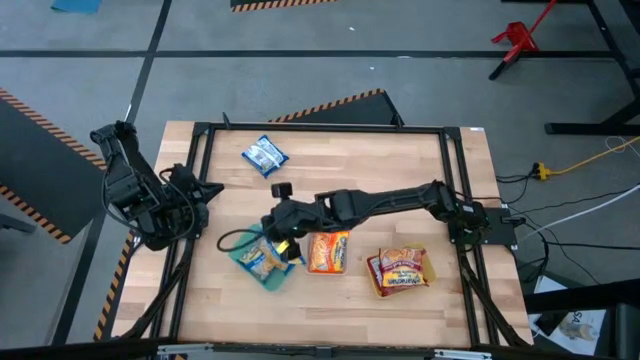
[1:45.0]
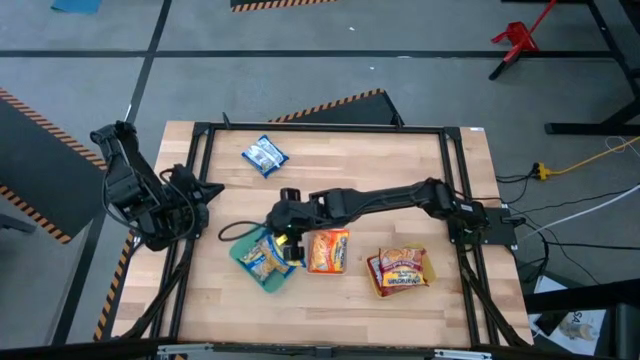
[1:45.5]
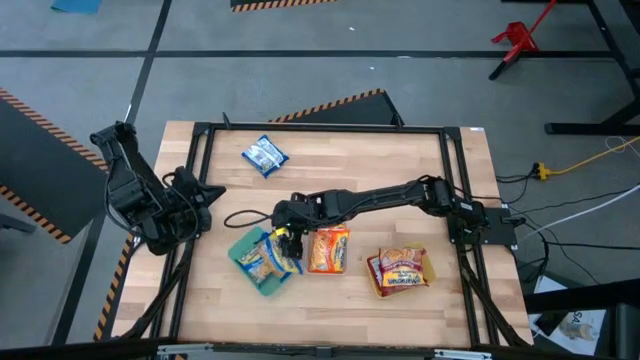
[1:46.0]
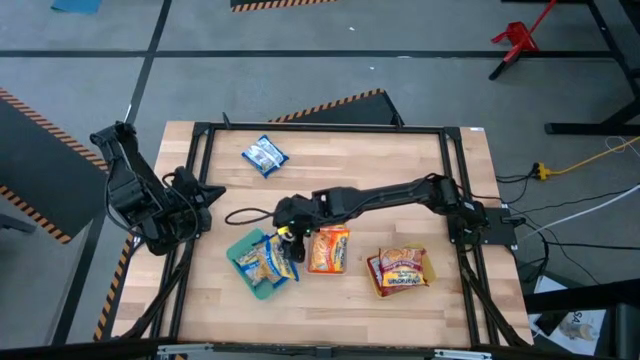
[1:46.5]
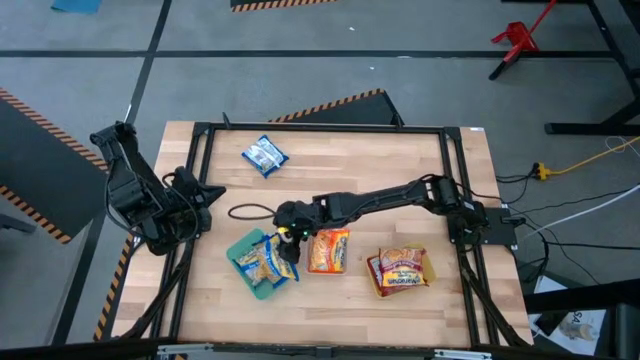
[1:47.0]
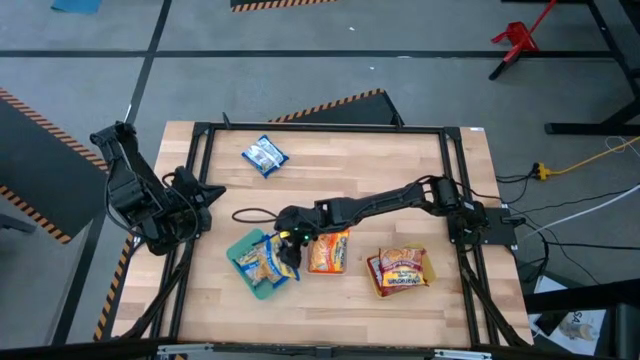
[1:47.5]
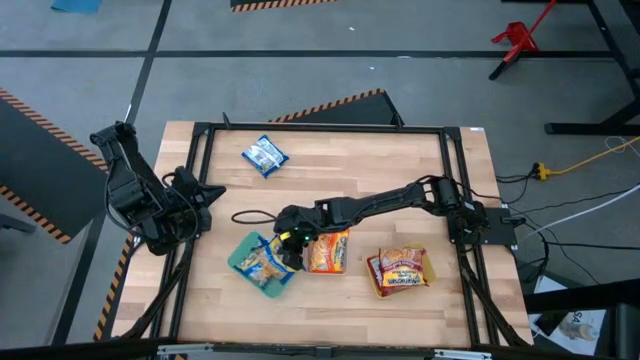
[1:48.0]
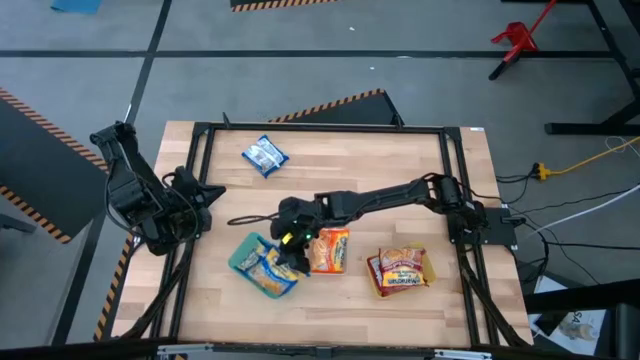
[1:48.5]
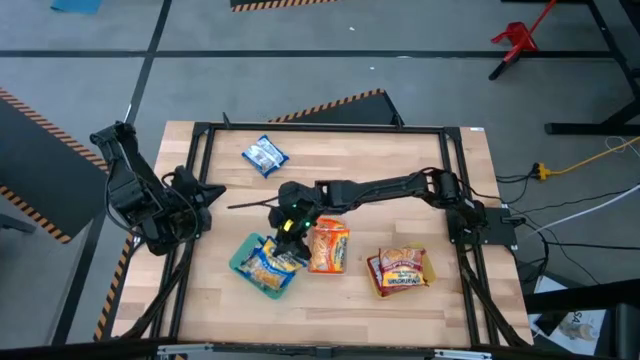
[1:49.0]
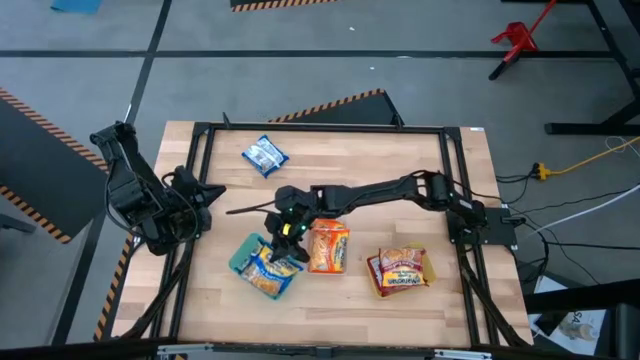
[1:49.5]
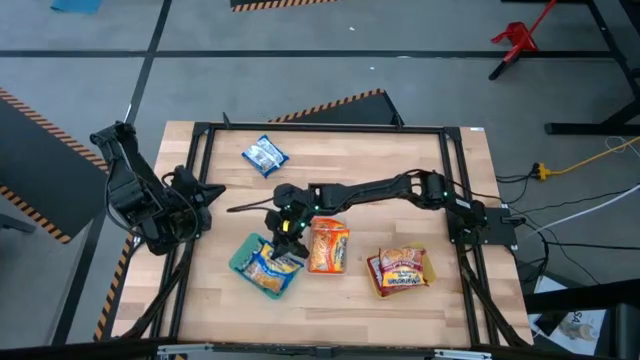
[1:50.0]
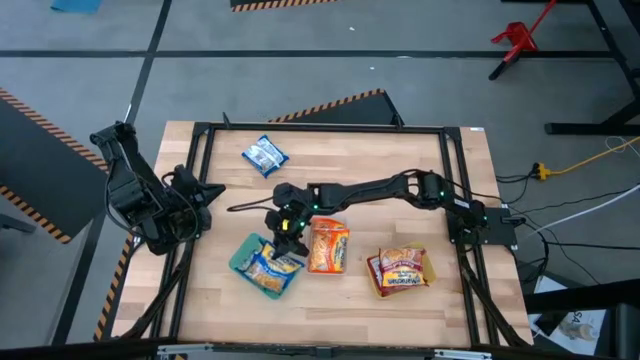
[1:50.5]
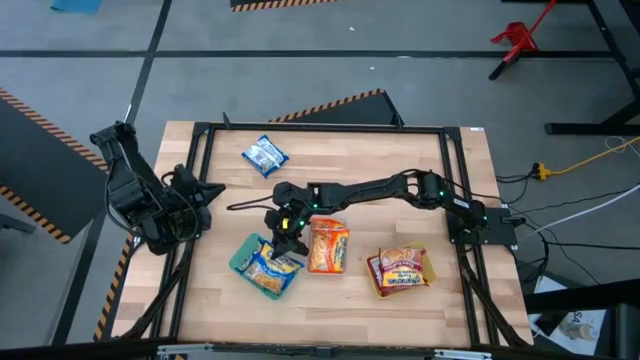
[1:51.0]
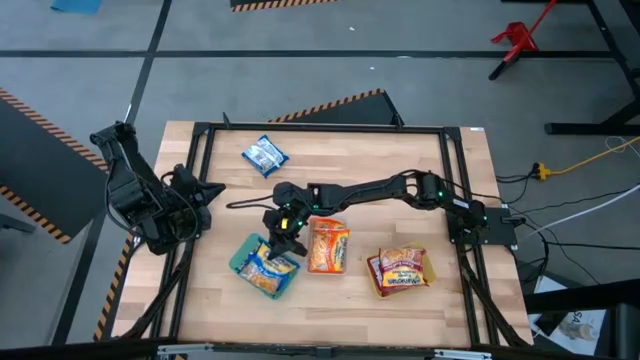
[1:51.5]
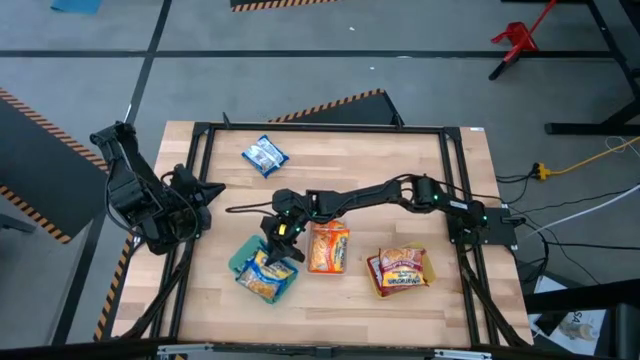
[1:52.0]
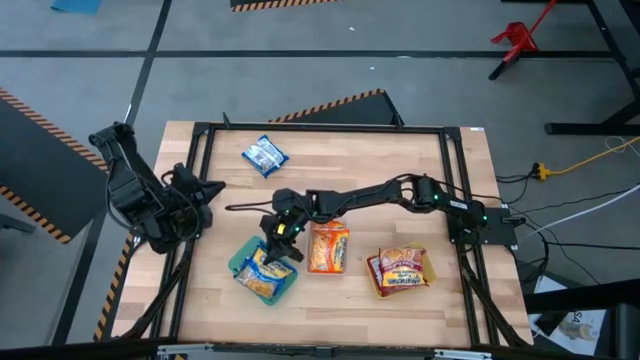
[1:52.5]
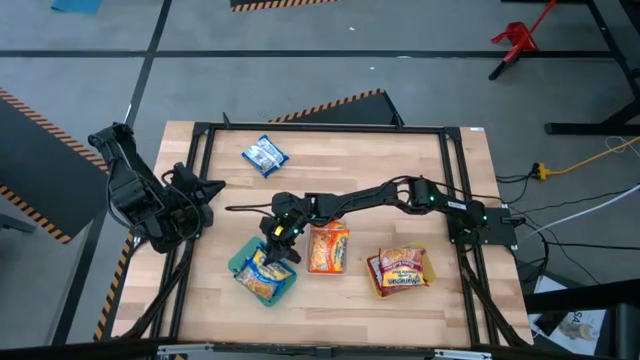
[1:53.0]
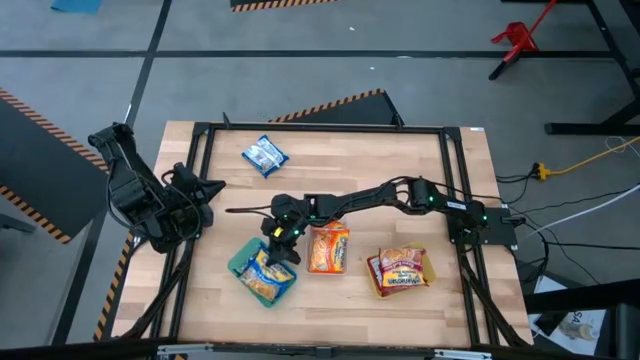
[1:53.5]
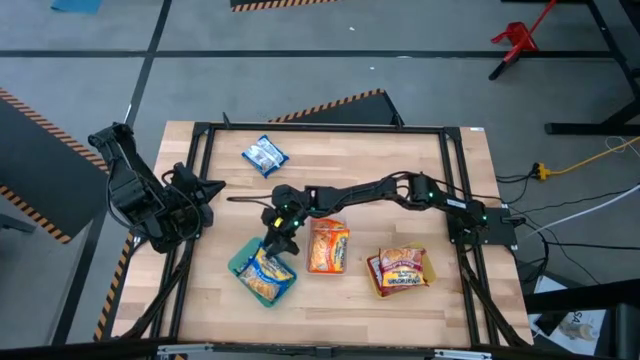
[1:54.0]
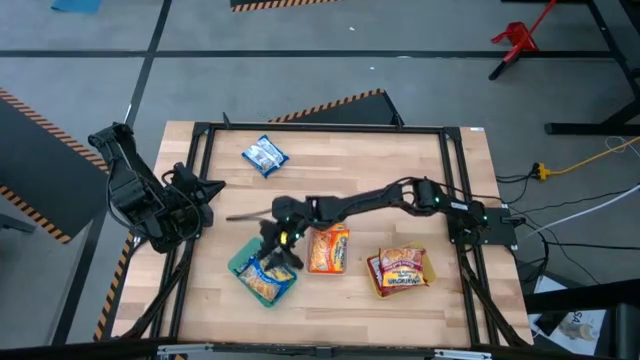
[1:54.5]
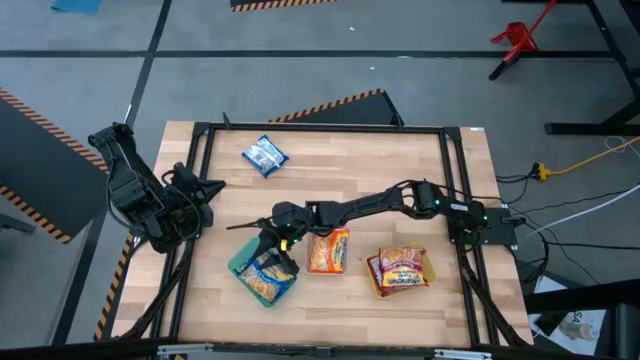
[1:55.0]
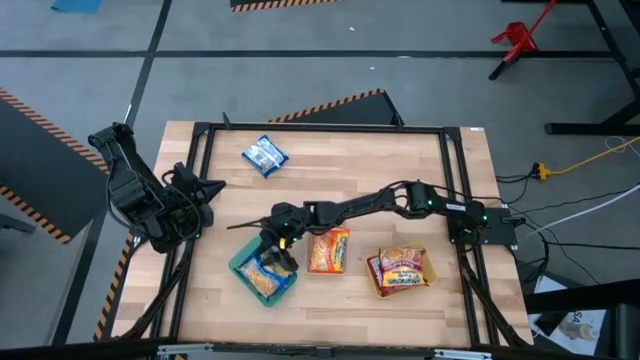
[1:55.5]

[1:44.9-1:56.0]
Task: Sort Maruchan noodles
Put the right blue noodle pack into the green bin

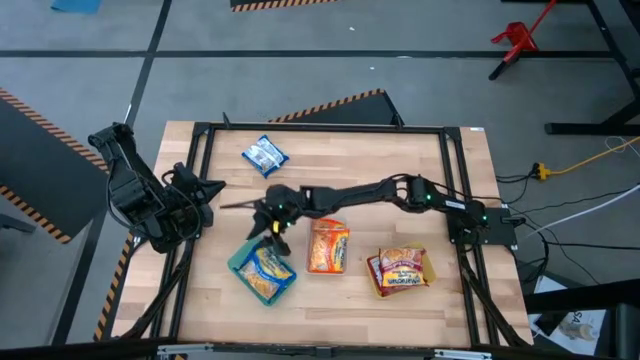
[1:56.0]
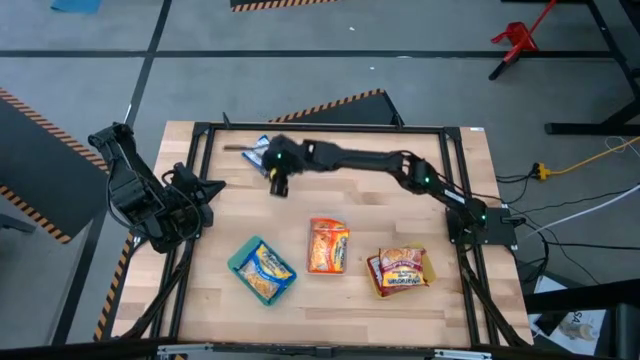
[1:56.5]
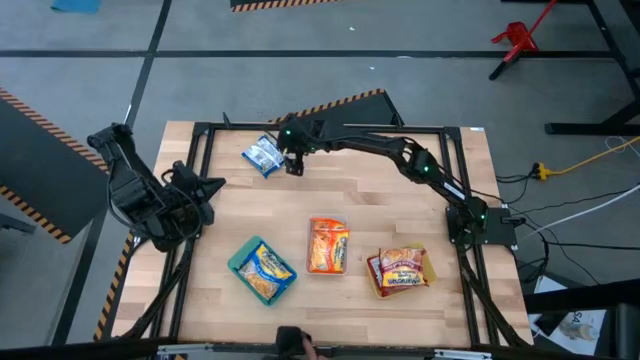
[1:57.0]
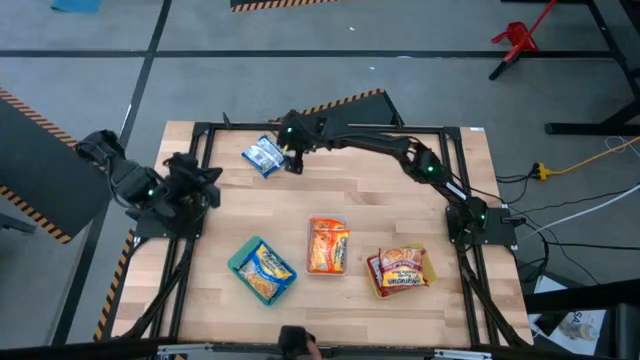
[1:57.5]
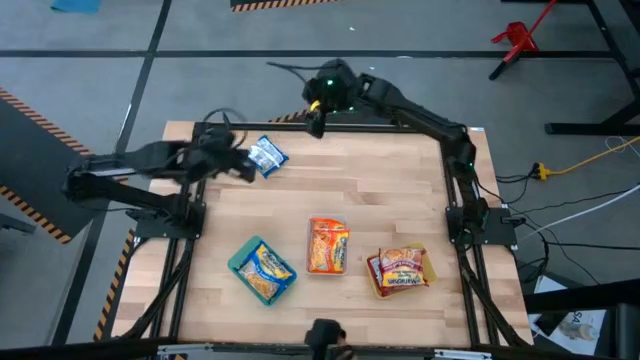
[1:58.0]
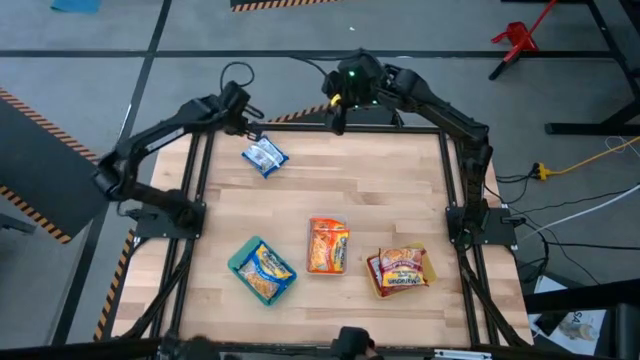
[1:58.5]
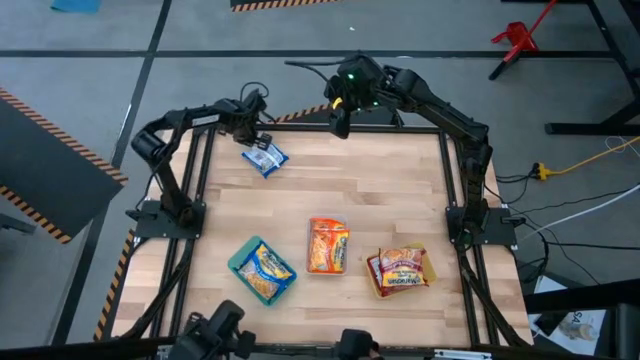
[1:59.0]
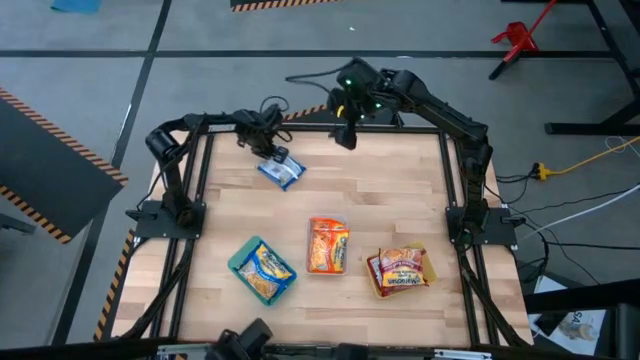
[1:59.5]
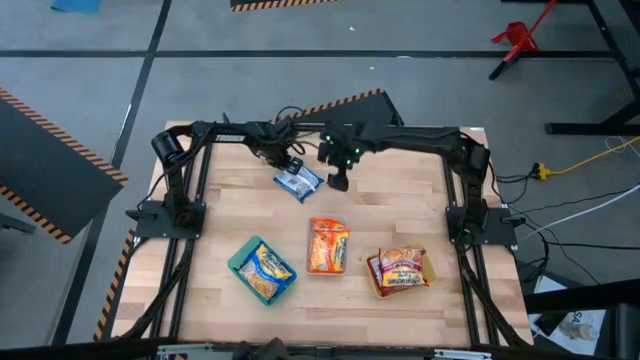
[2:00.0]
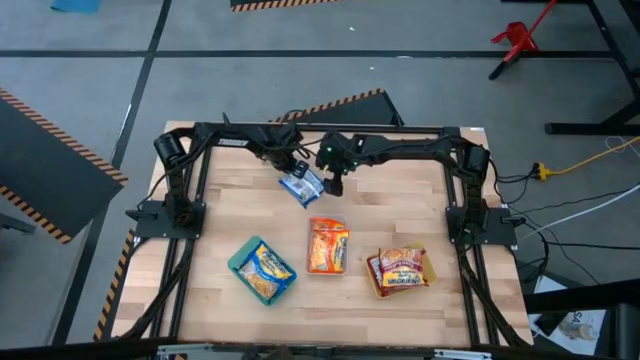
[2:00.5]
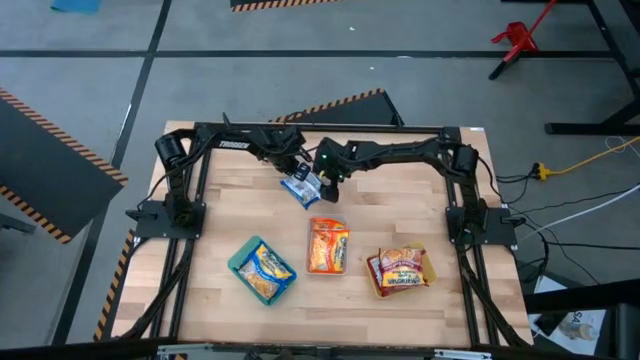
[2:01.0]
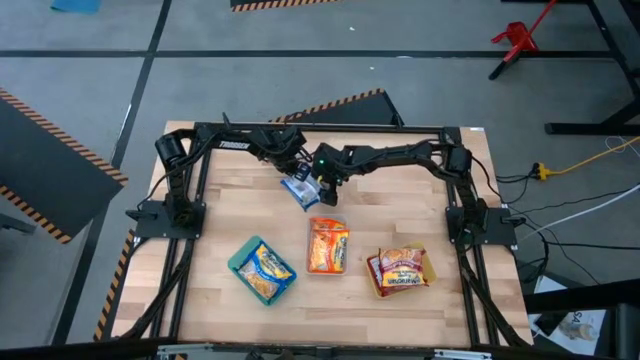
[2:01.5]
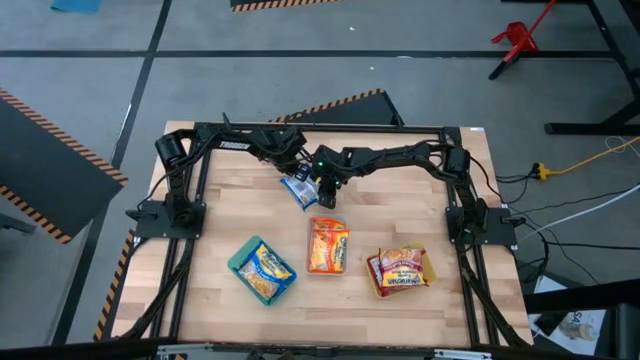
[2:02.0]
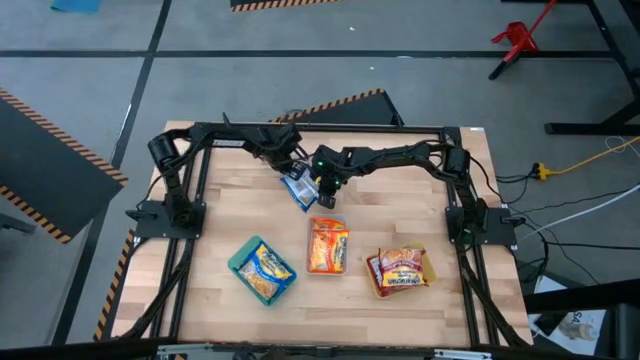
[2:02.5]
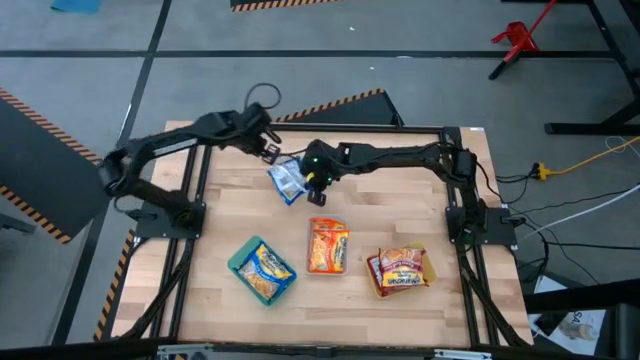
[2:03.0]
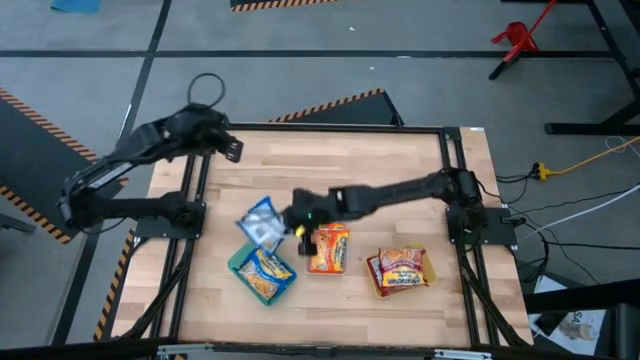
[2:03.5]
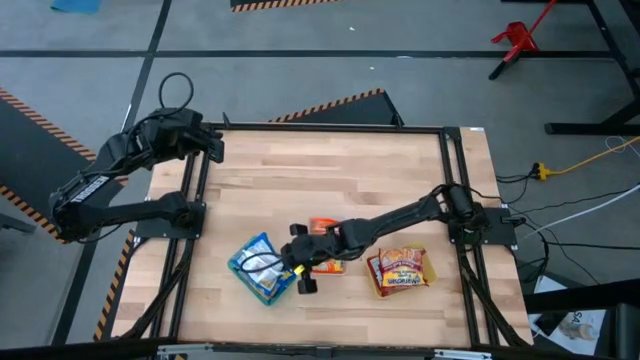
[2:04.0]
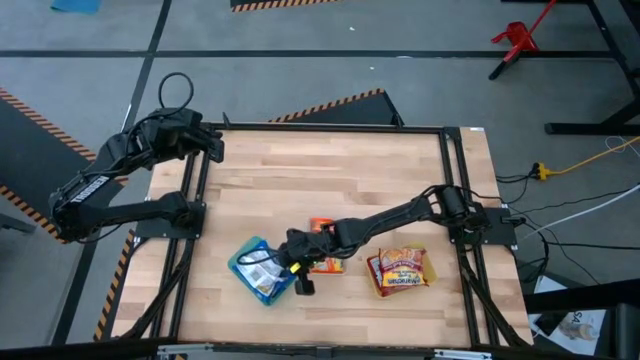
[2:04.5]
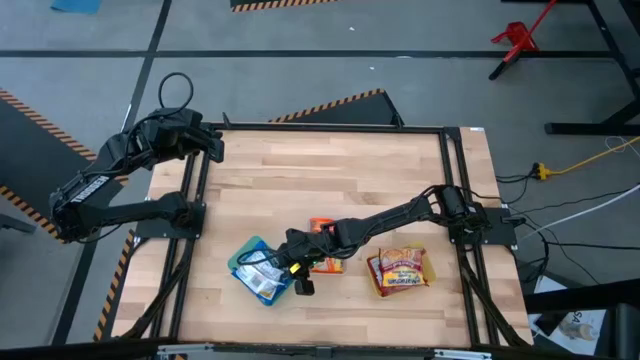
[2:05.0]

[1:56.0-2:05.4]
Put the blue noodle pack into the green bin

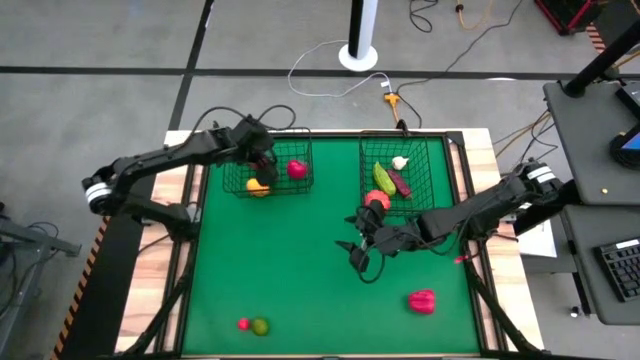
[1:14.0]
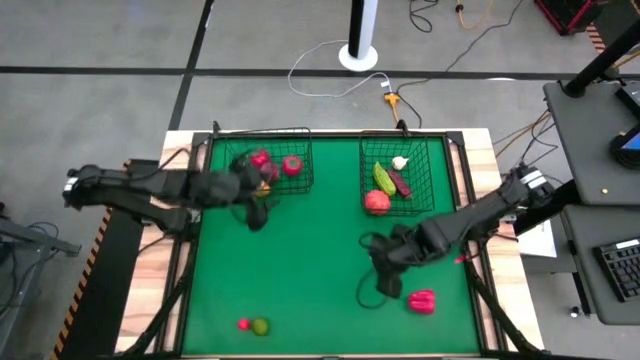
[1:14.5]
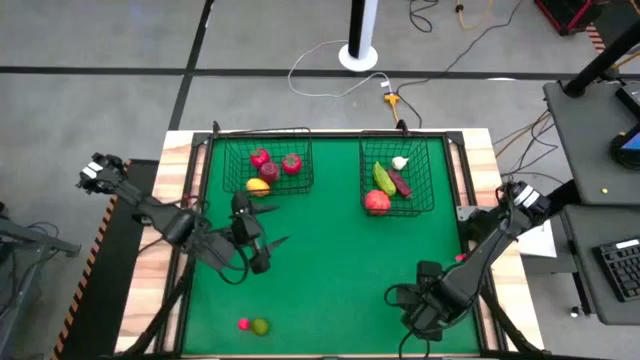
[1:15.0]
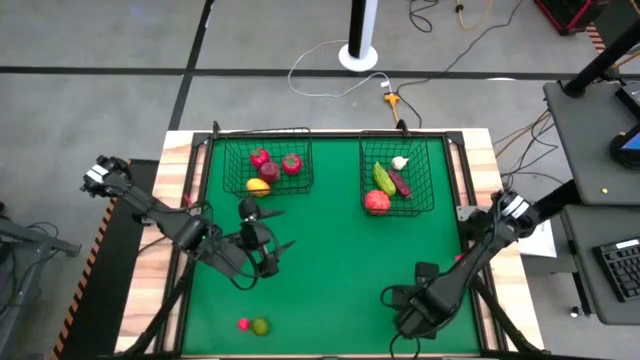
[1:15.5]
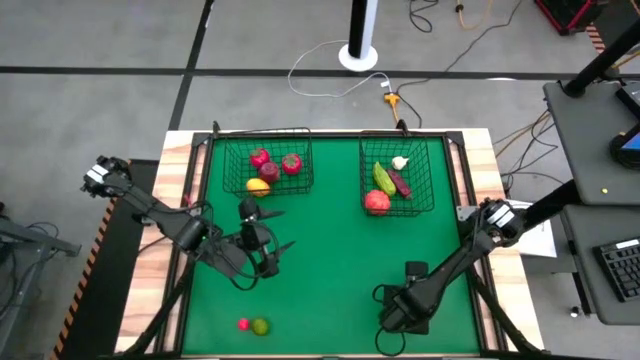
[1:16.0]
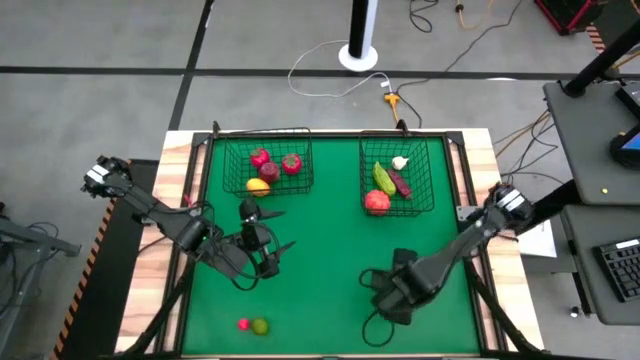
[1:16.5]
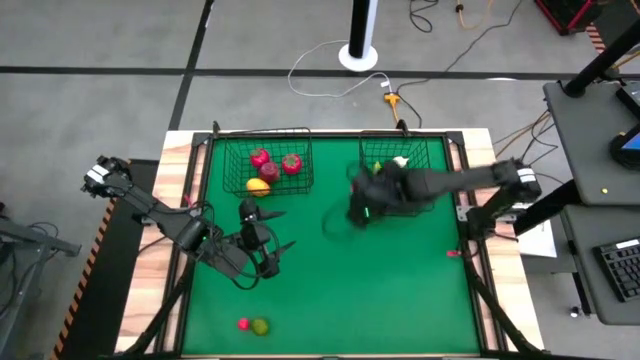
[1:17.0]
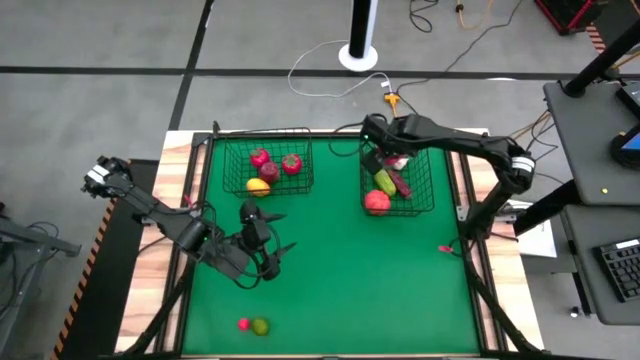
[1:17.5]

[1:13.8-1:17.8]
Task: Sort produce into baskets
Put the red bell pepper into the right wire basket
